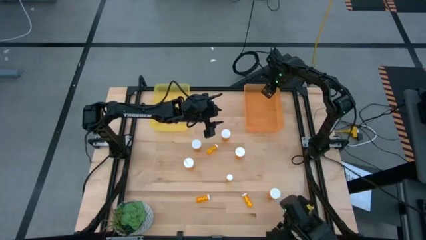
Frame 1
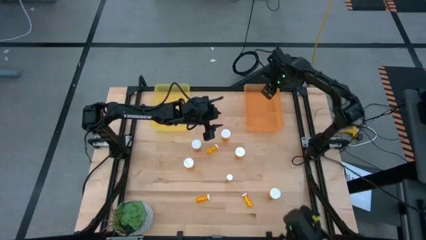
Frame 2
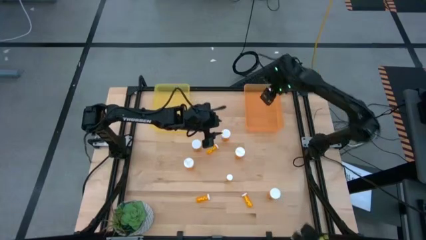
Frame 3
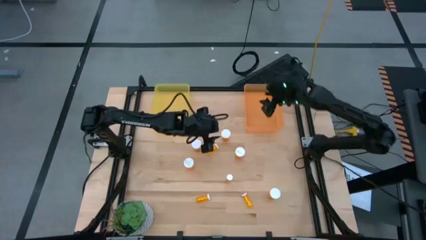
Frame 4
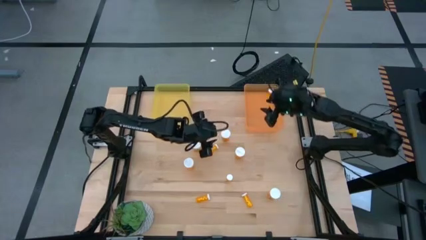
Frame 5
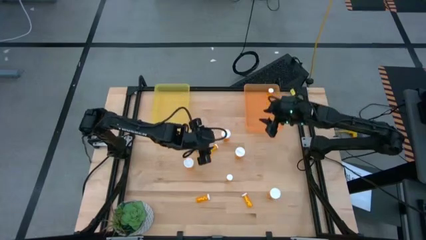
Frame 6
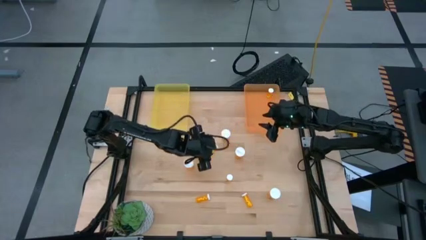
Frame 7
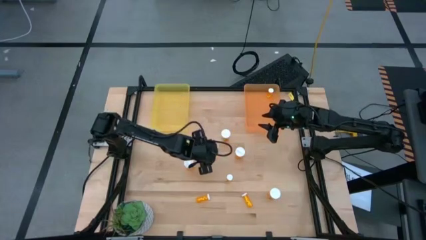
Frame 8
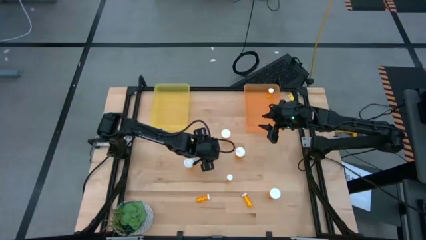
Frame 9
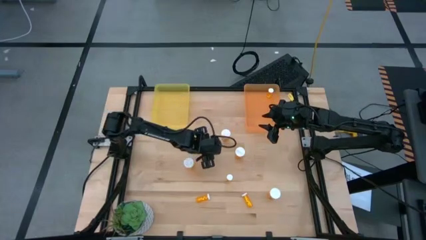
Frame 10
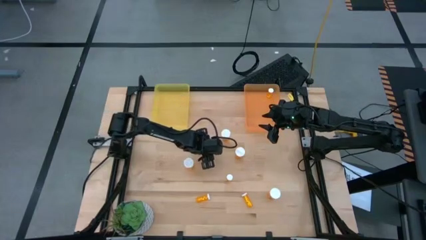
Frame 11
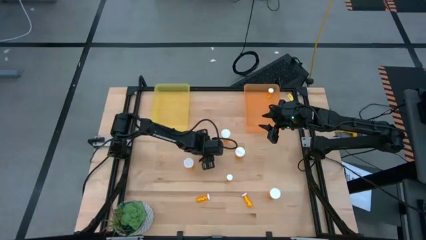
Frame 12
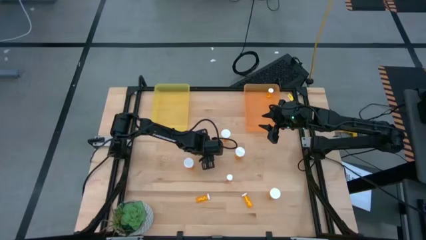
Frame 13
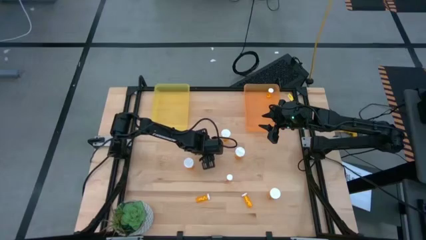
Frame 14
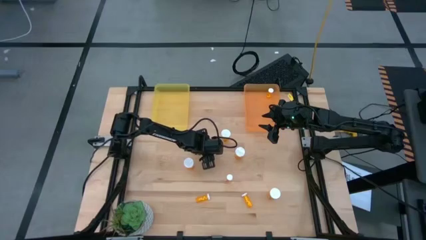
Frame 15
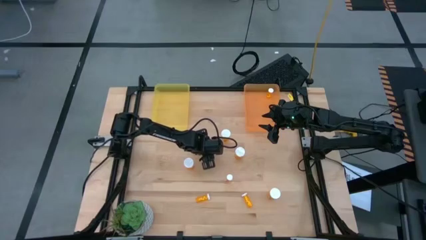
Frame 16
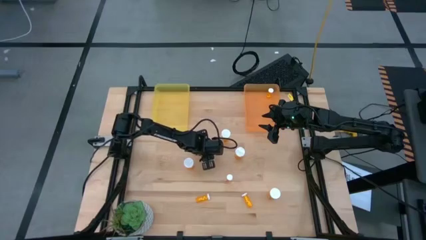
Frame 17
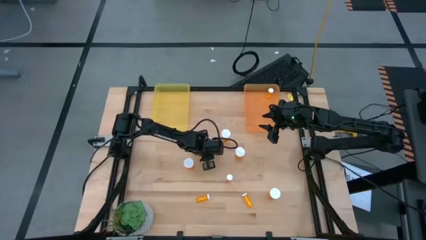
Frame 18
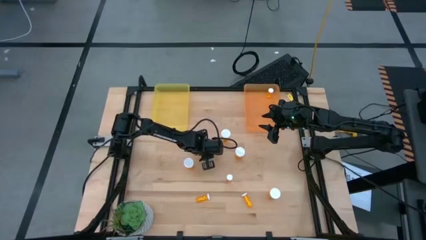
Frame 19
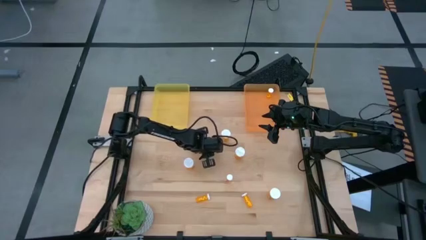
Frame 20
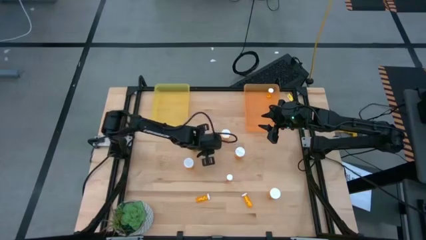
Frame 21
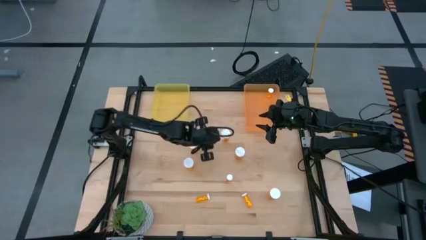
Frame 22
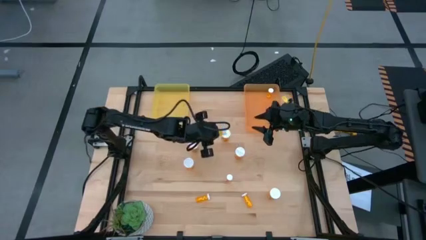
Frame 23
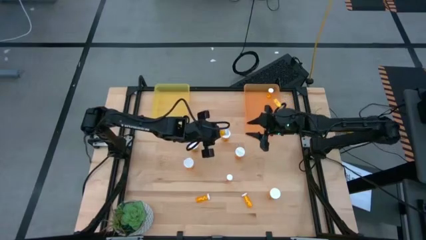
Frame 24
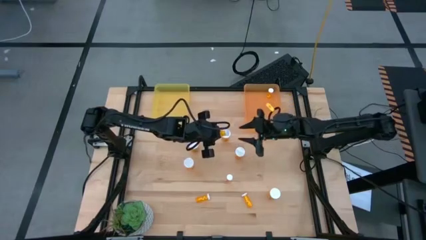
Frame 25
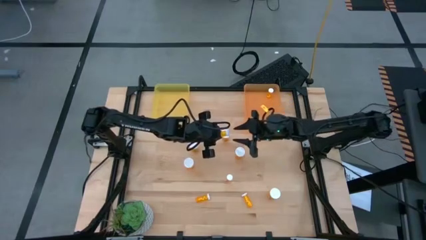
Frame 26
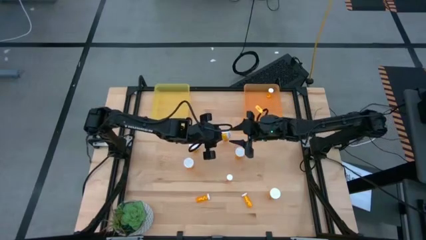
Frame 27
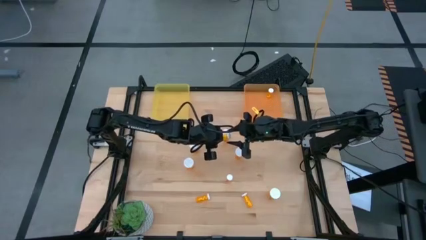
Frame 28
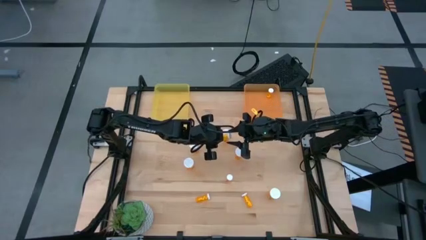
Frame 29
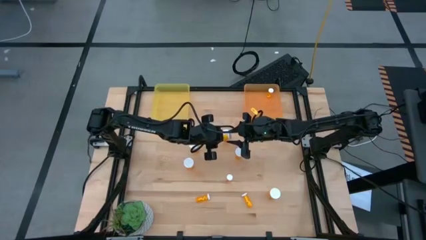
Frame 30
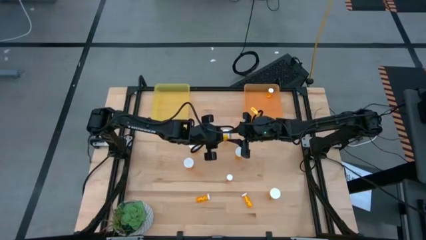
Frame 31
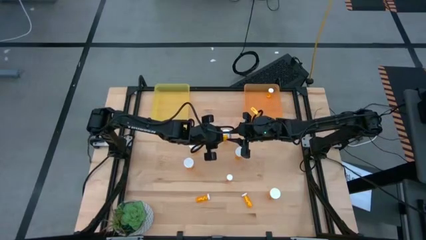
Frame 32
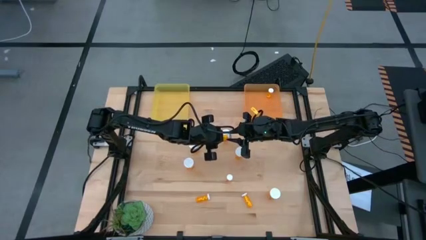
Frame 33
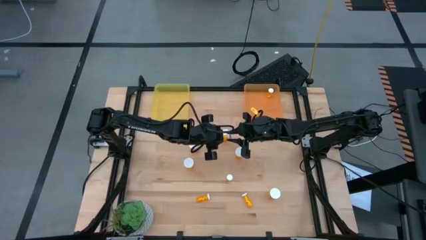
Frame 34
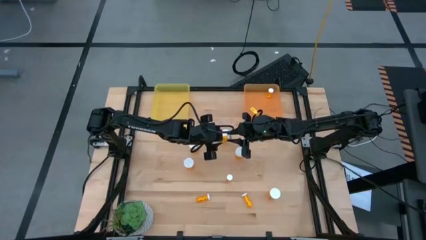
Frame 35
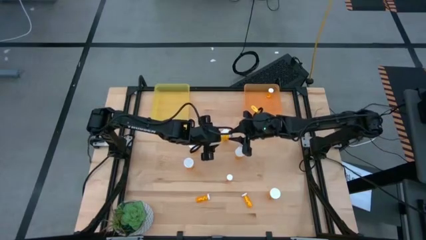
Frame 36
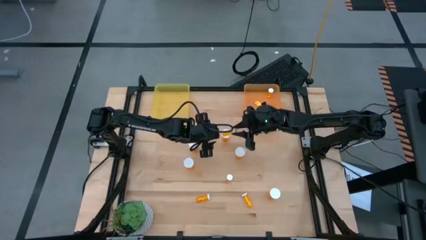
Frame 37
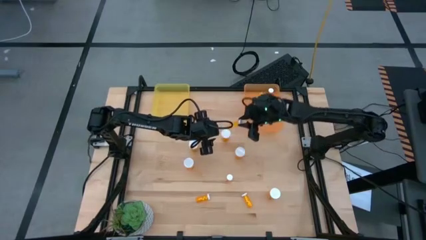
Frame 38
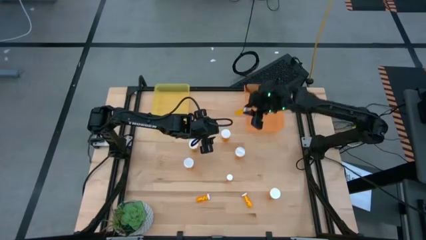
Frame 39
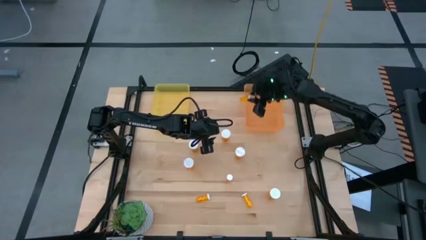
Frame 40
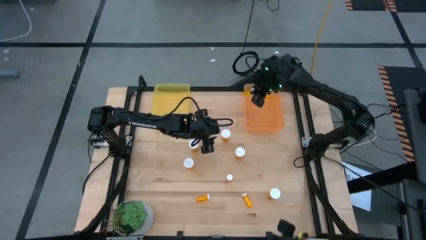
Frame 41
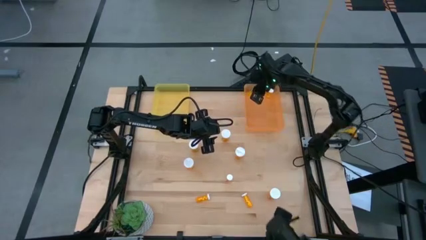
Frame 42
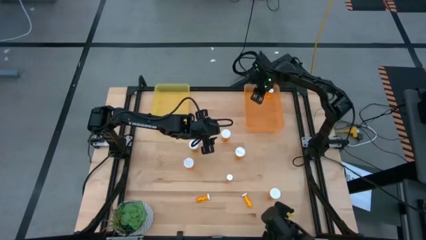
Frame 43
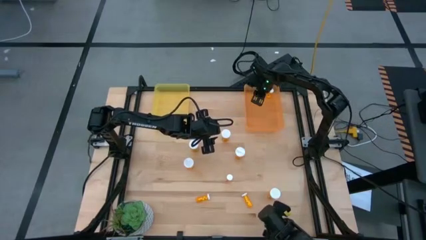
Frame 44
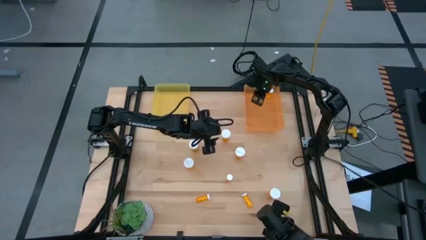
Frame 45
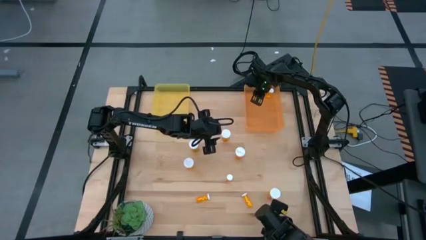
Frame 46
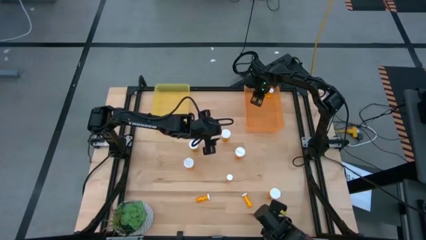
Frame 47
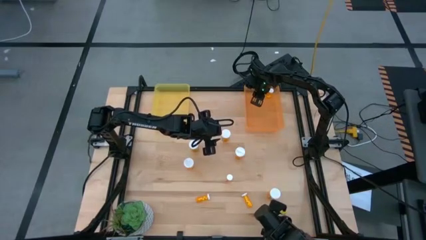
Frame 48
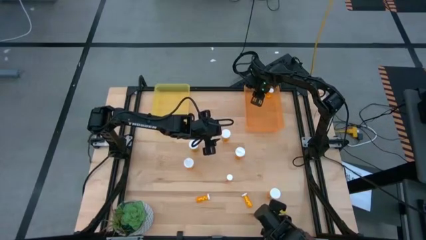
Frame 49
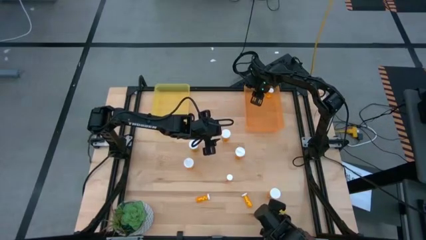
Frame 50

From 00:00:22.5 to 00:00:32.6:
Task: Pick and place medicine bottles into bin by pill shape (circle, oval)
Put the small orange pill bottle into the orange bin
